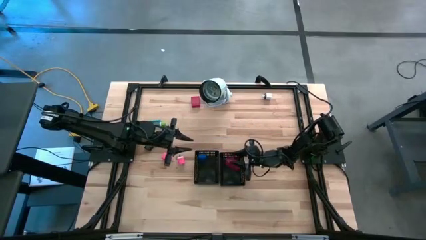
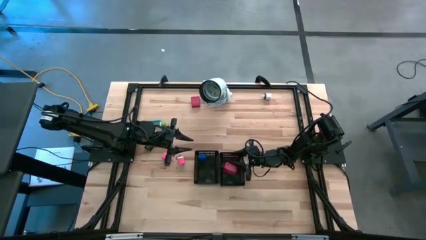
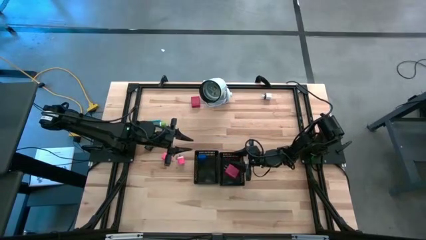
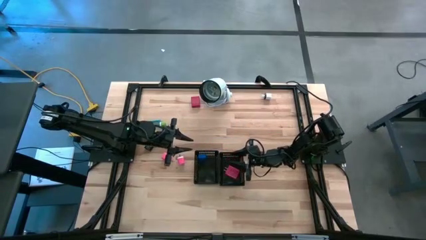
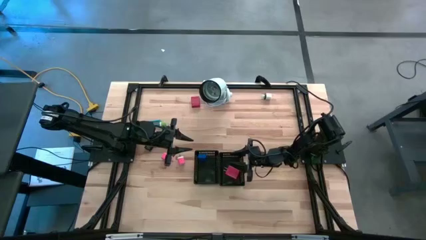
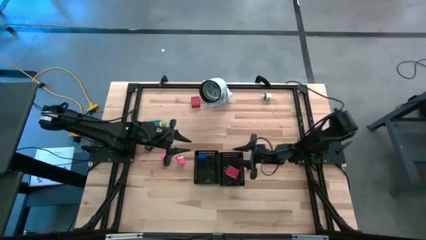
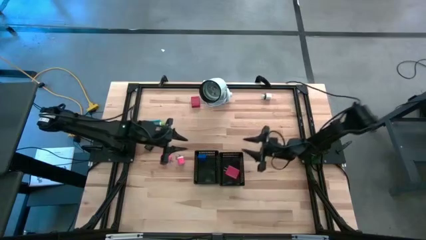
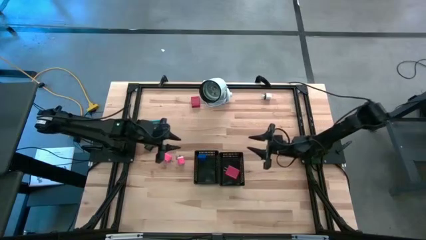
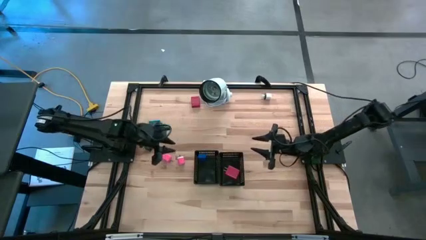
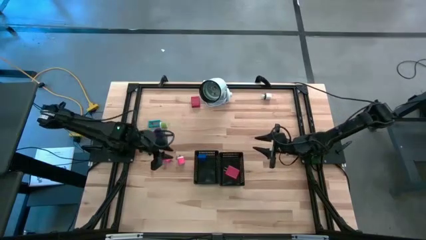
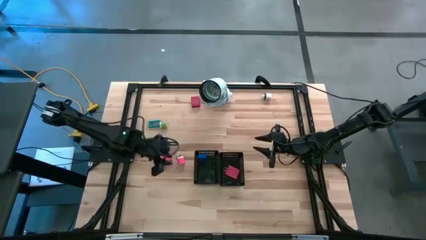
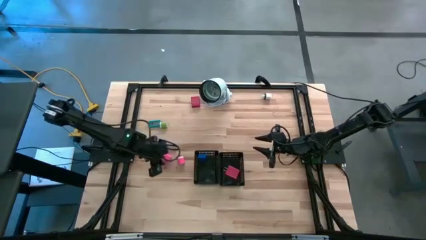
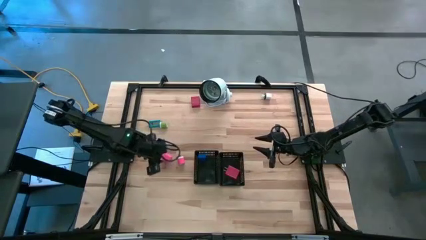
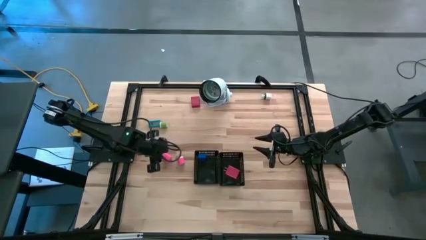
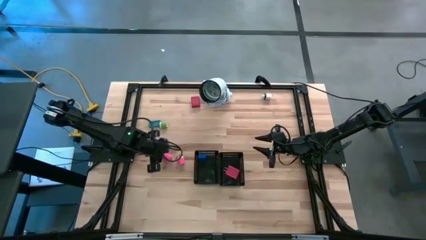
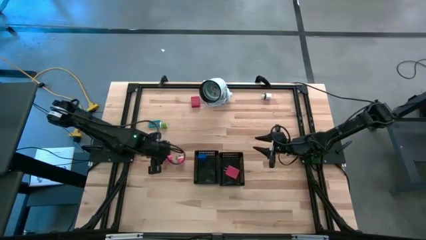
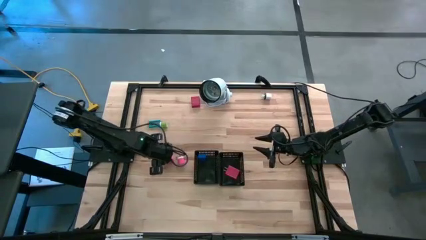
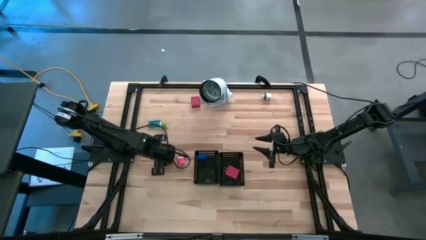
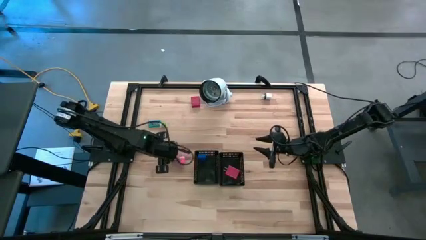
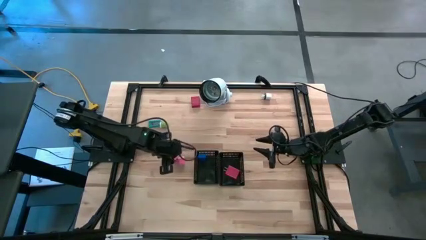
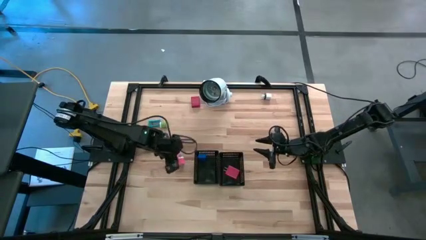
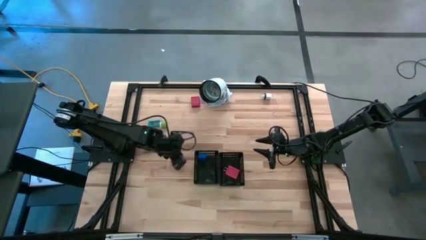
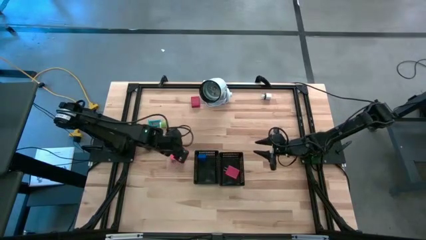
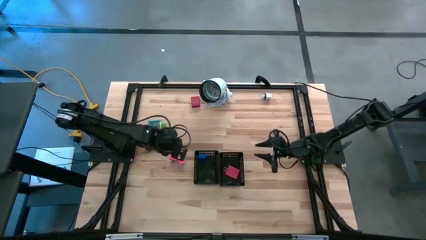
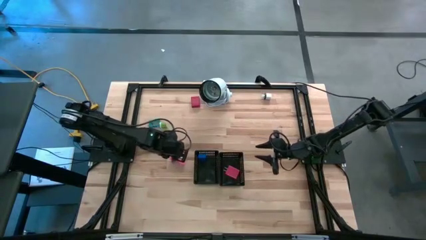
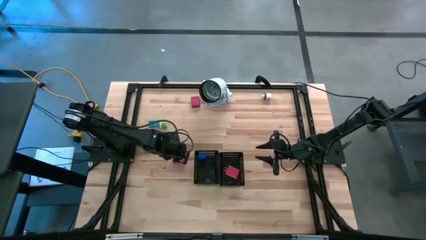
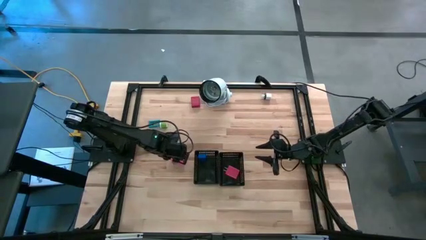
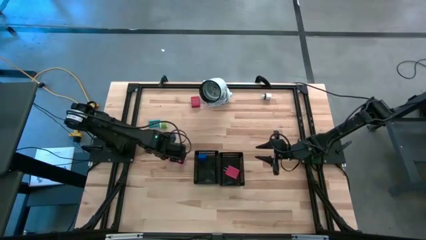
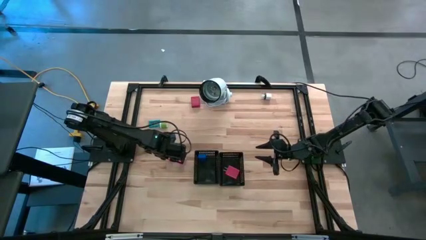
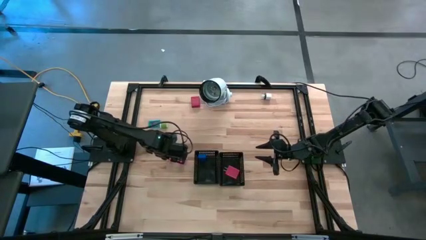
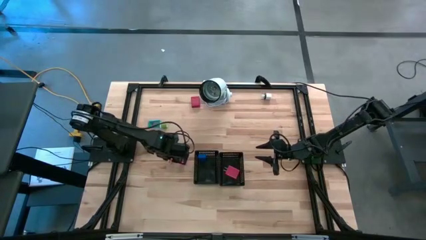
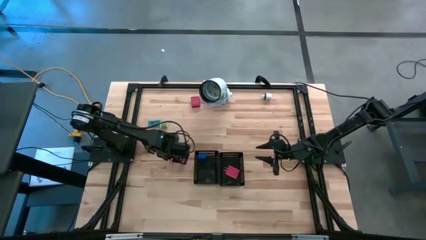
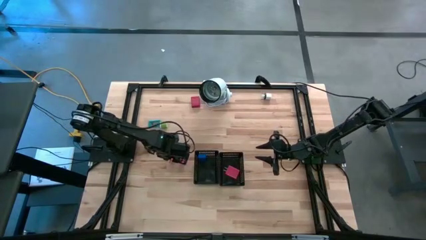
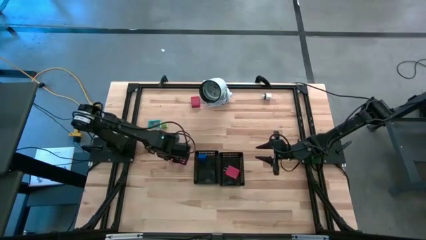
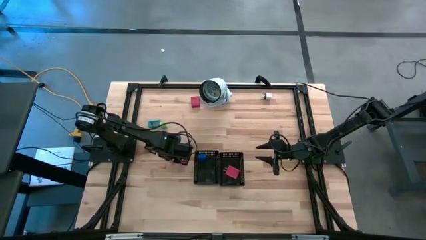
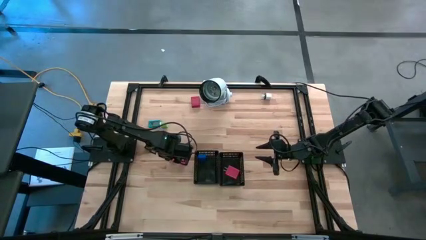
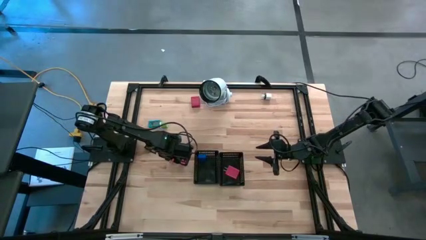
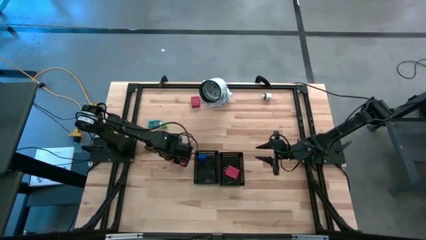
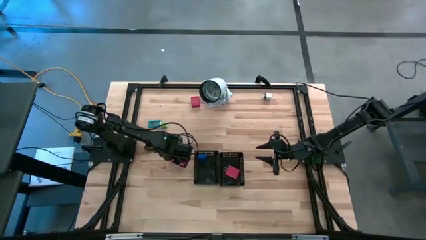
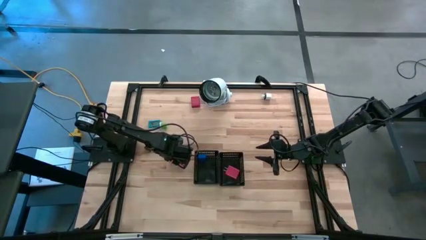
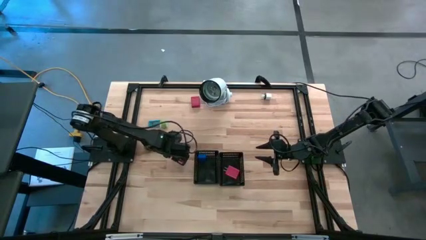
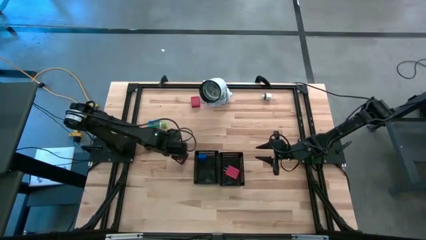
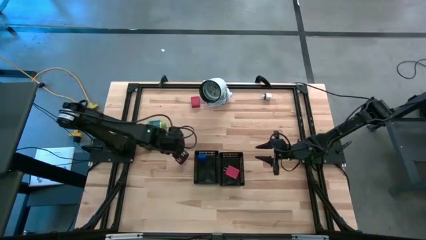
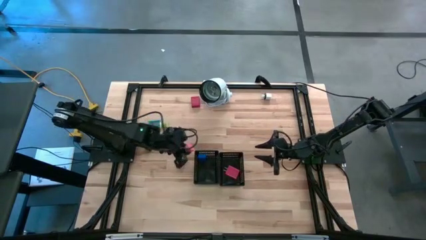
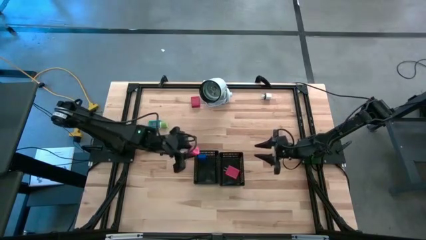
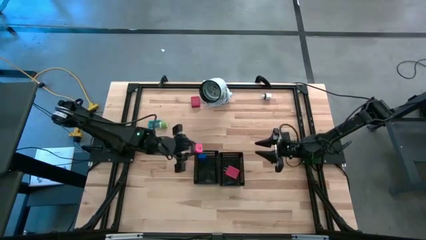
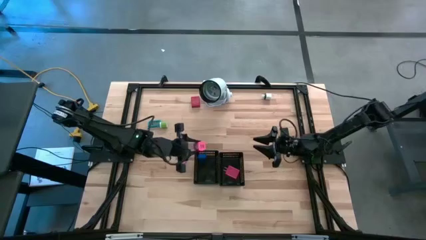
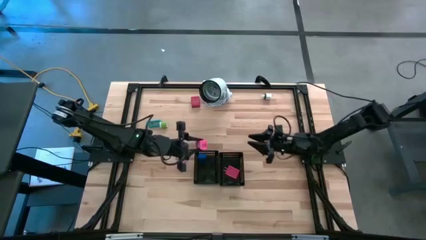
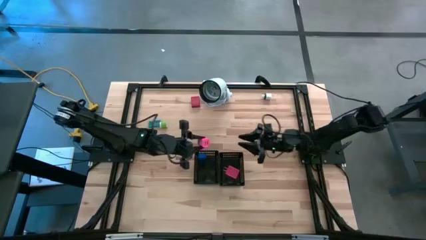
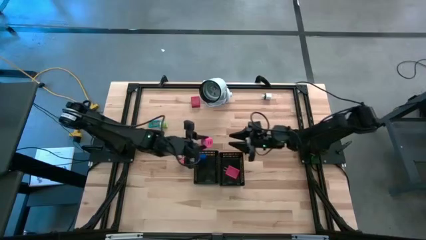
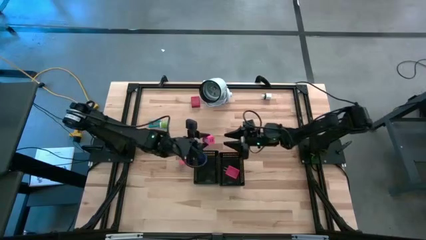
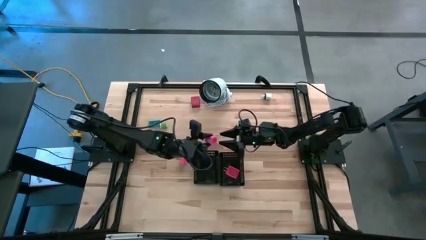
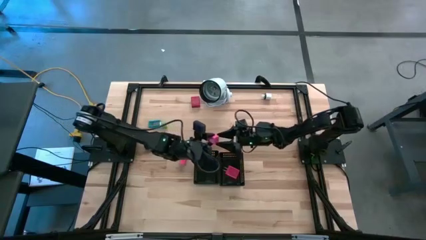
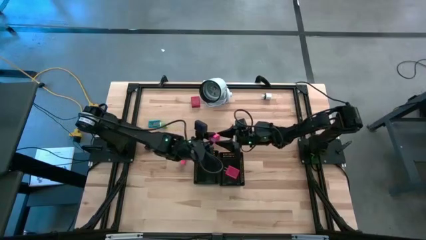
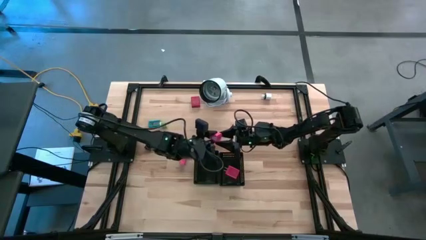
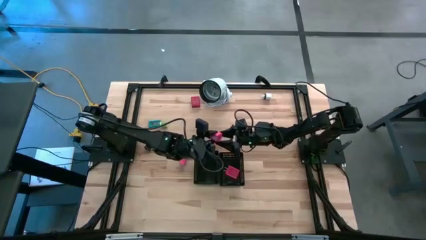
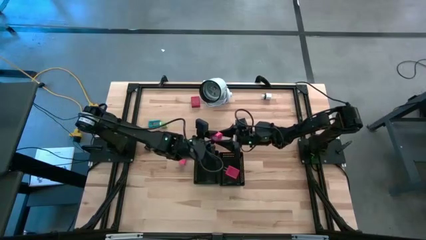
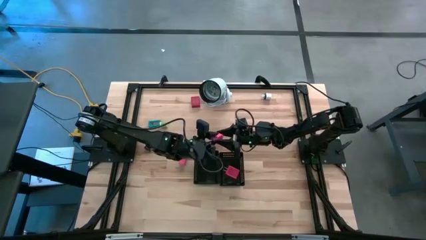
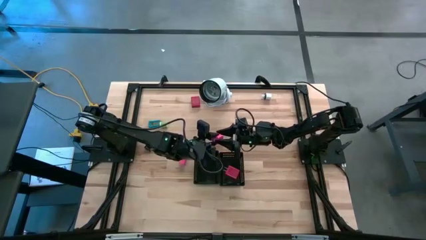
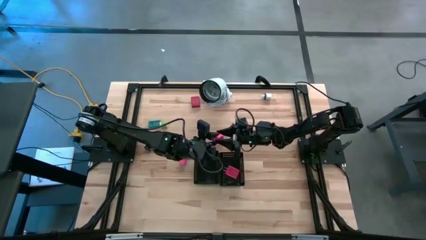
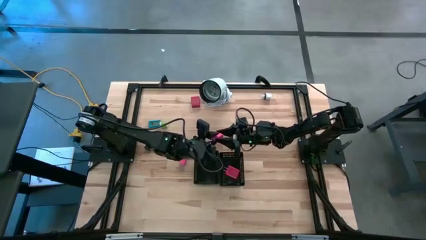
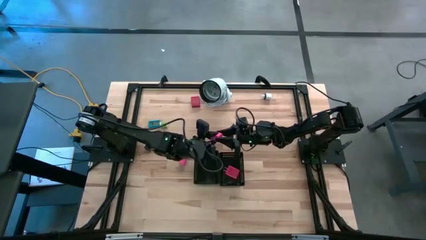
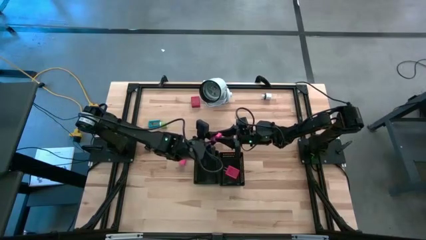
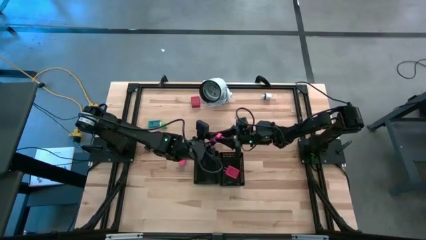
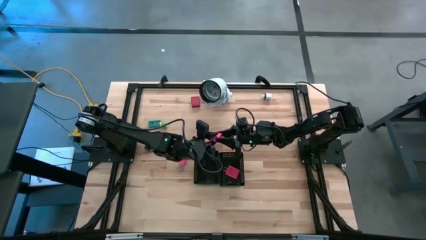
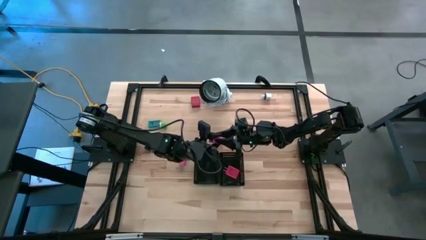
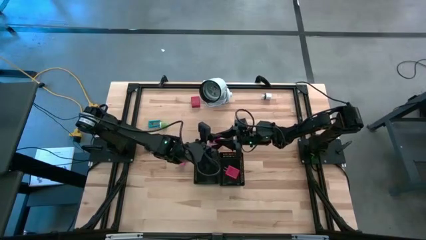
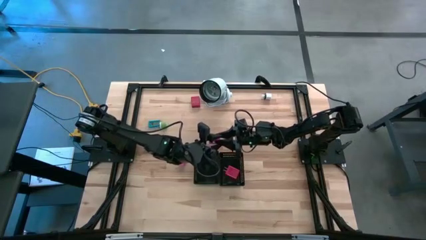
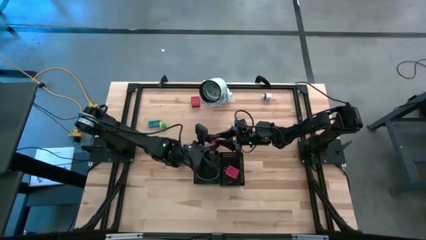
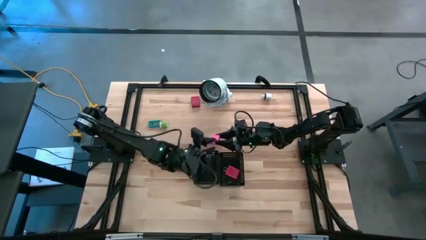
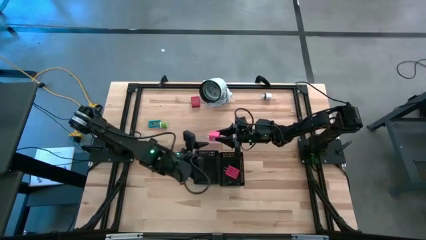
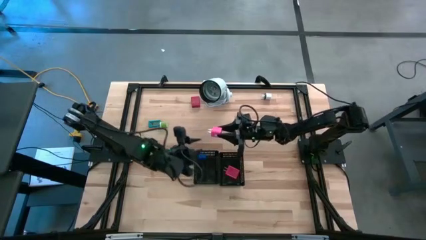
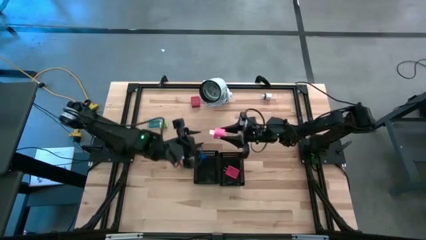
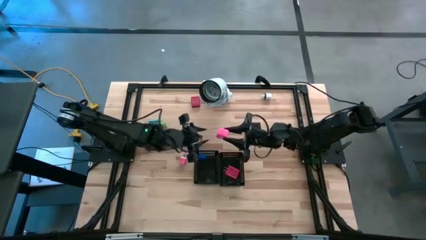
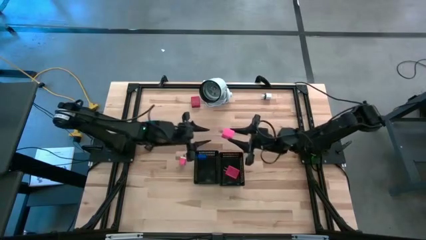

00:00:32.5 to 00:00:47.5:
Task: Pick & Place Office items
Put the pink charger adapter into the right black bin
